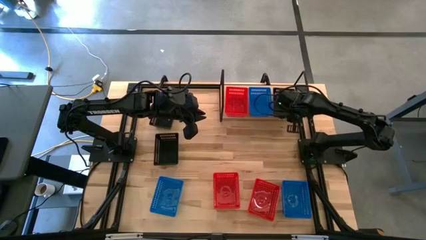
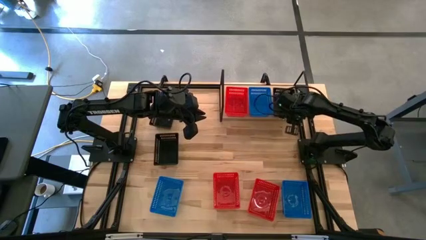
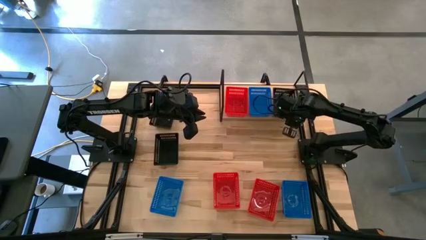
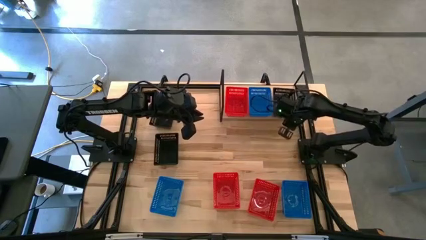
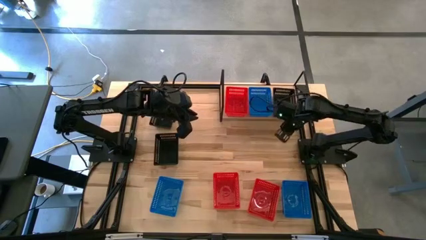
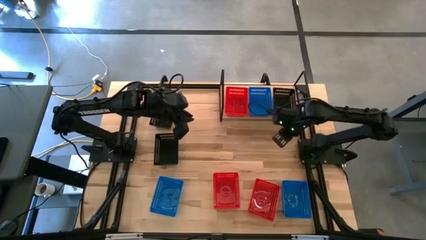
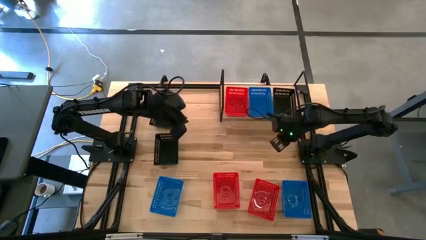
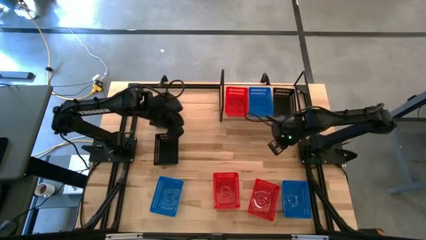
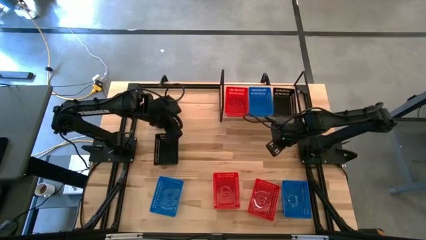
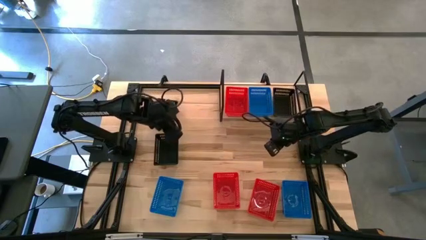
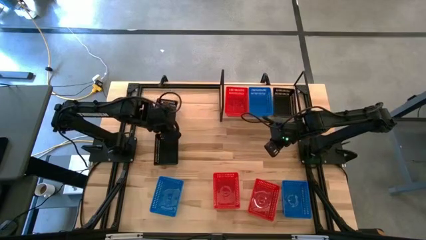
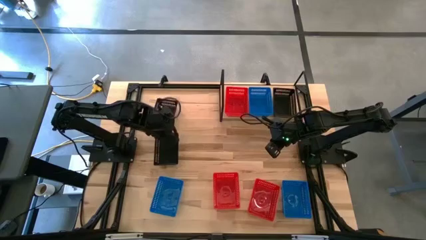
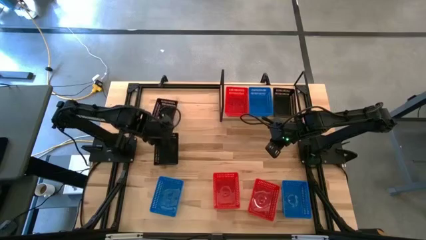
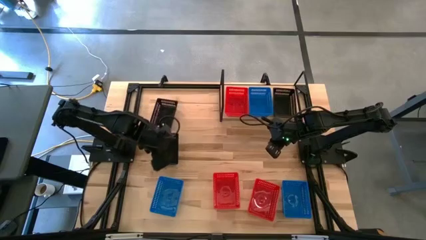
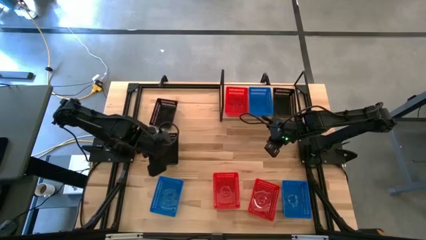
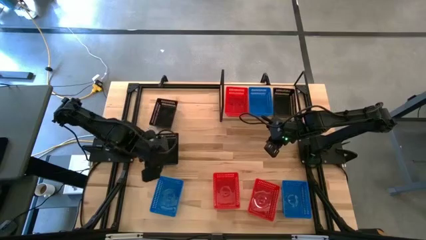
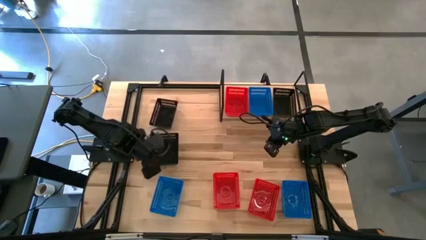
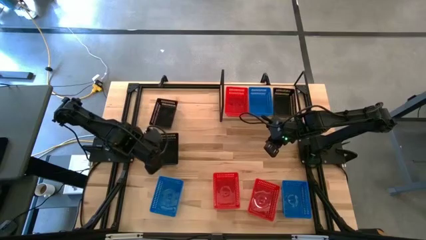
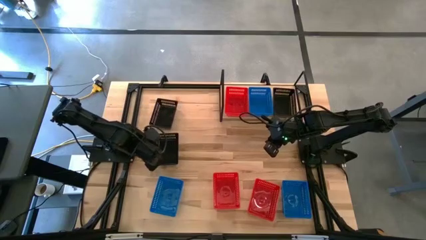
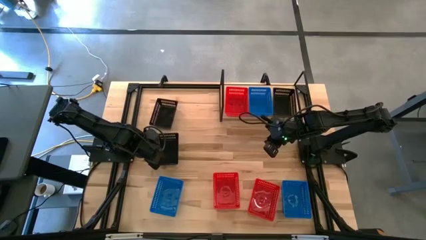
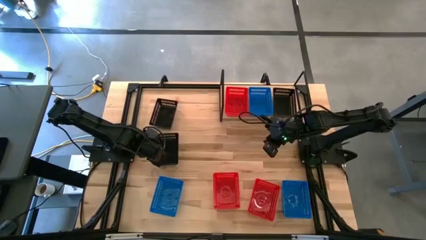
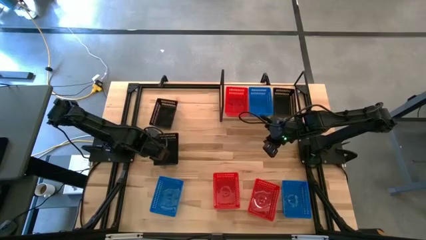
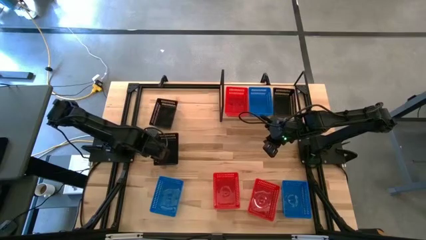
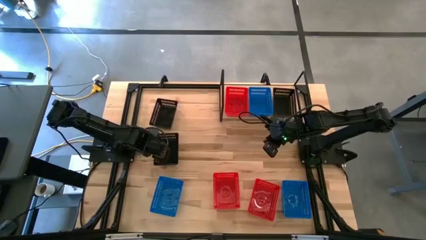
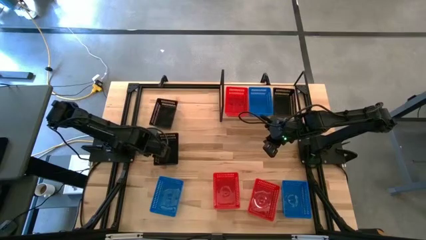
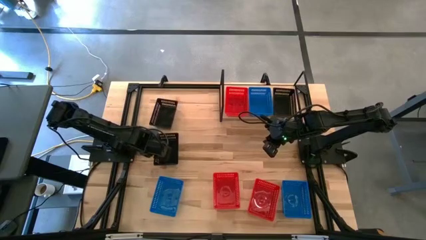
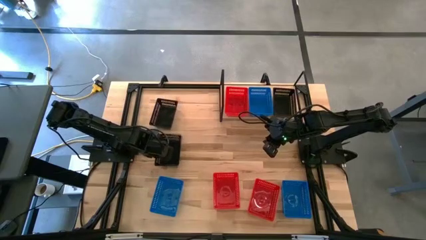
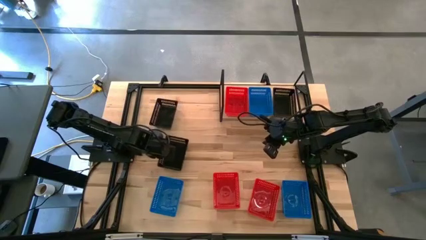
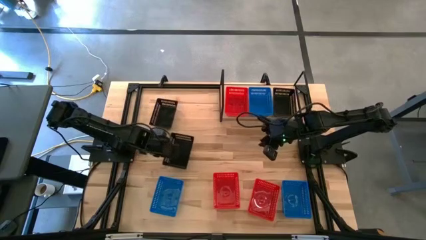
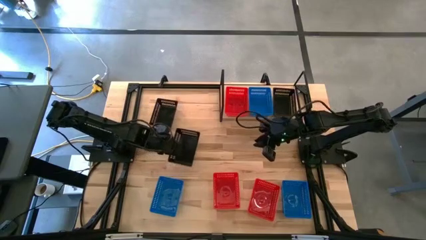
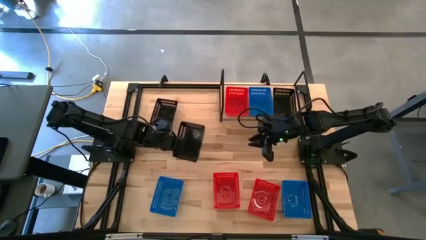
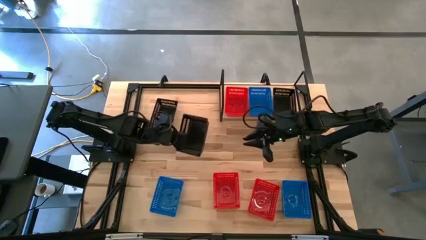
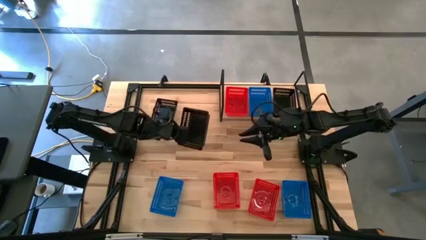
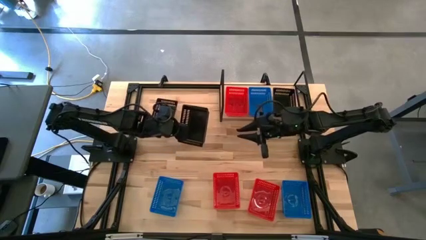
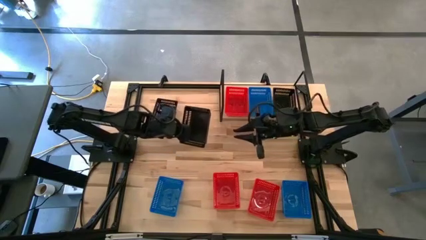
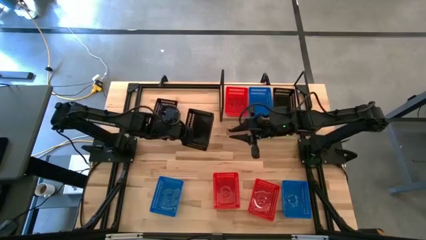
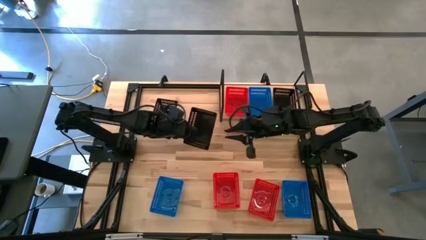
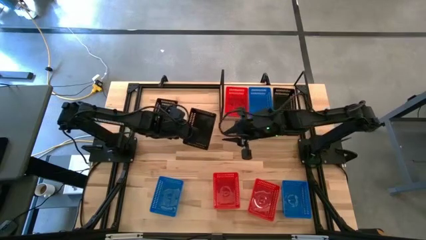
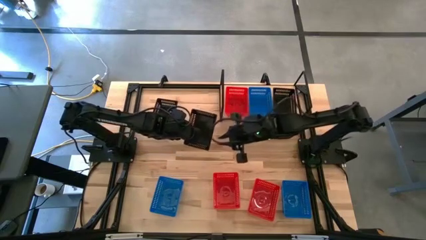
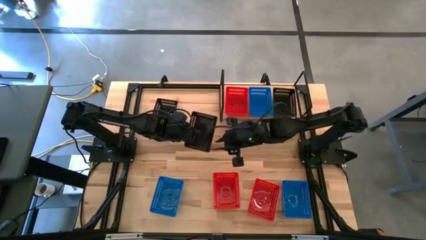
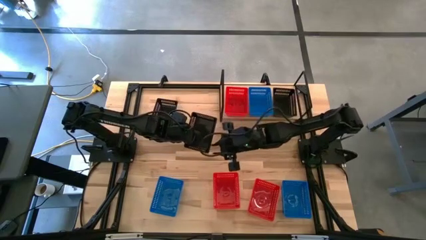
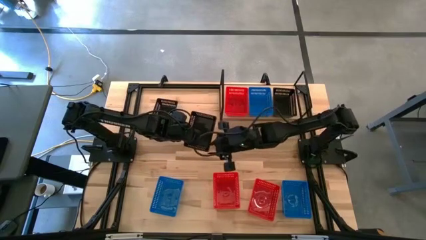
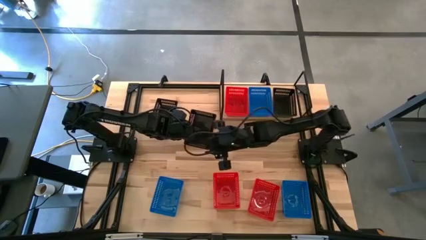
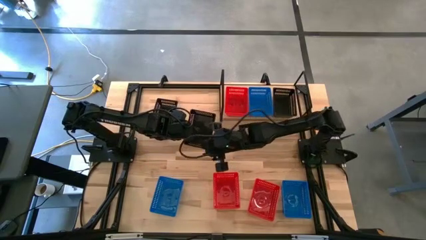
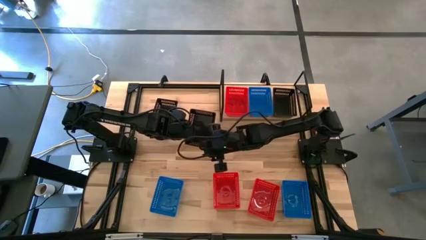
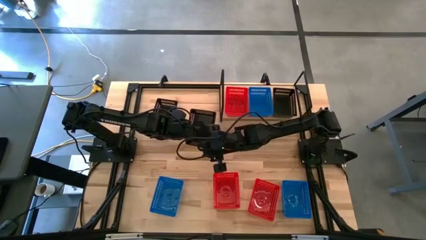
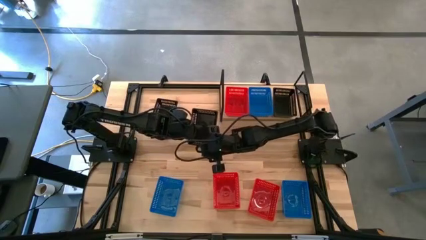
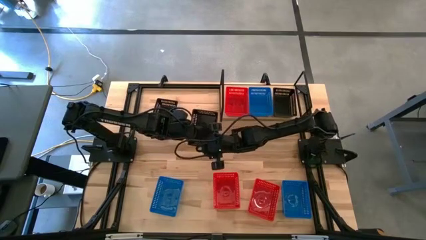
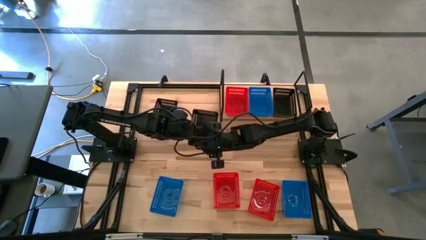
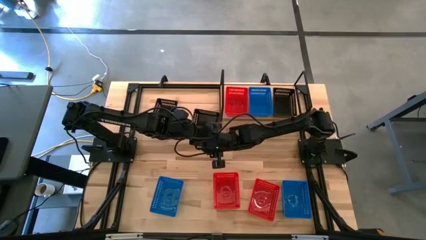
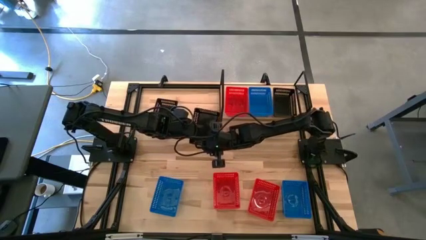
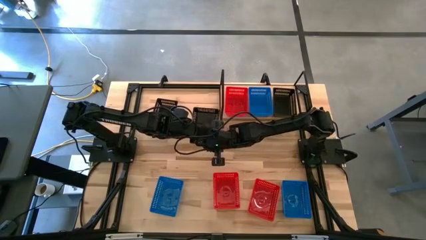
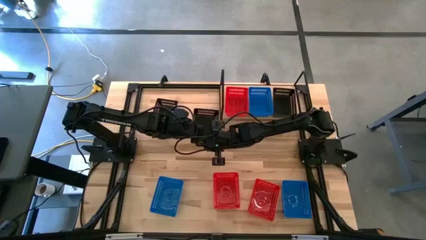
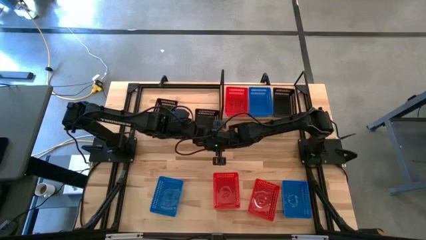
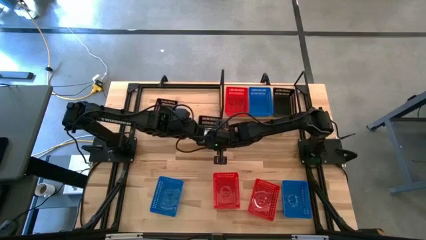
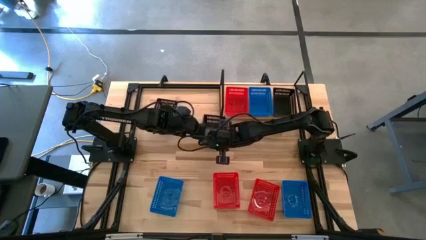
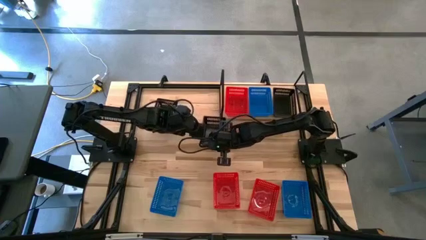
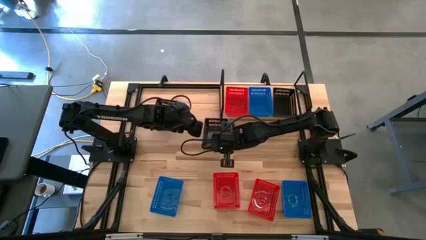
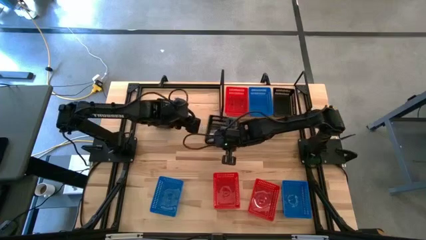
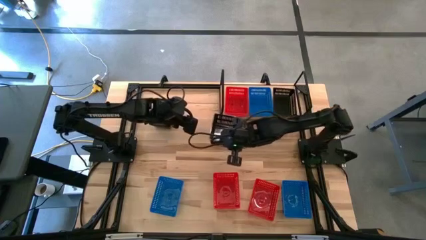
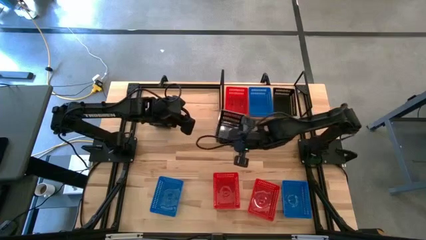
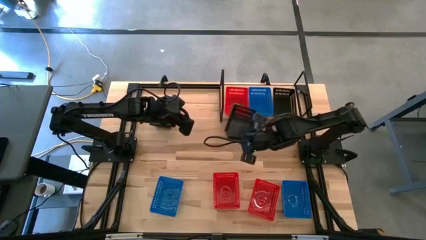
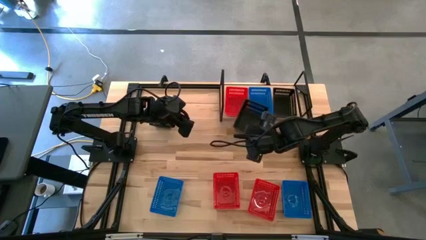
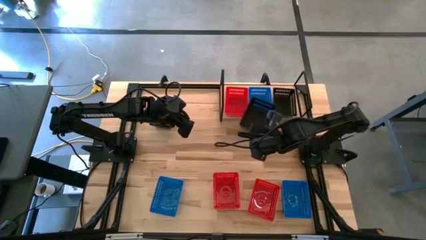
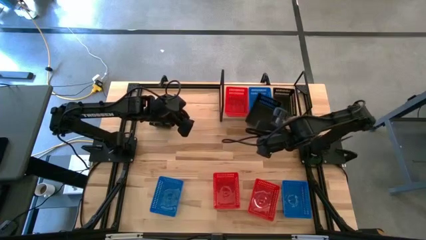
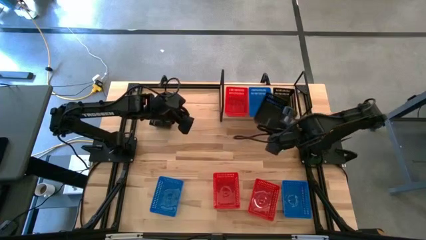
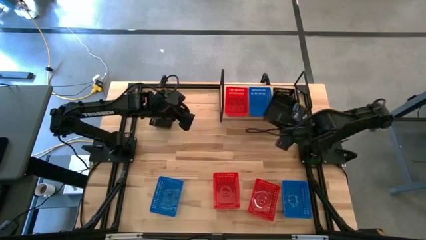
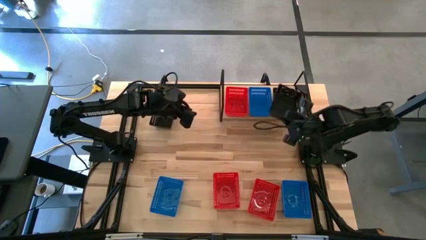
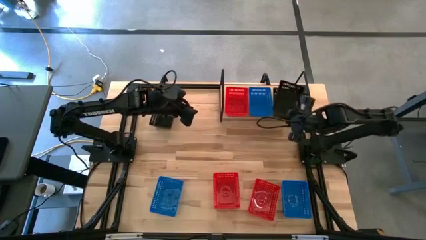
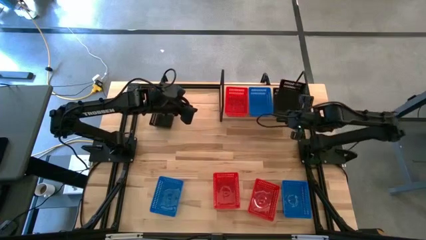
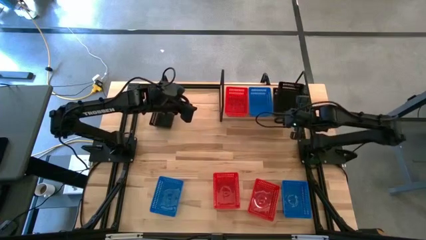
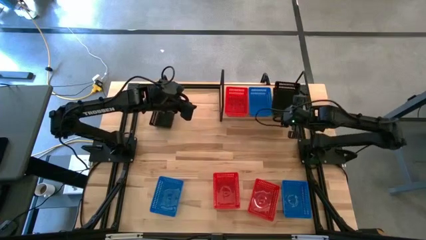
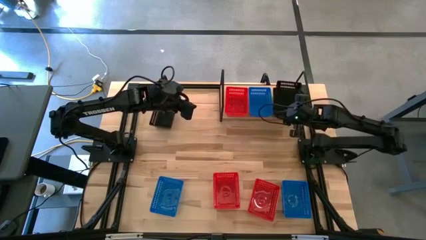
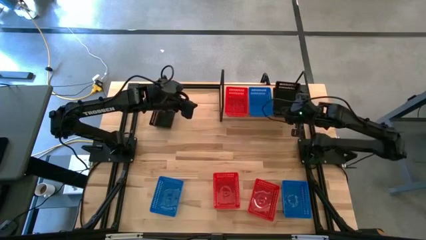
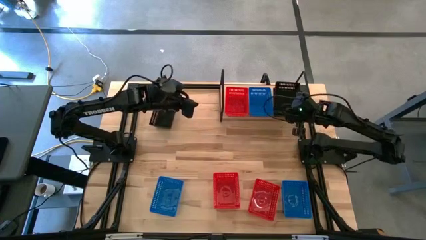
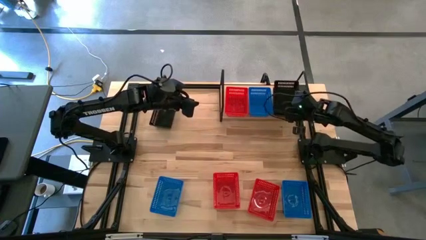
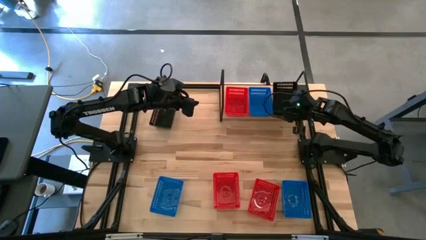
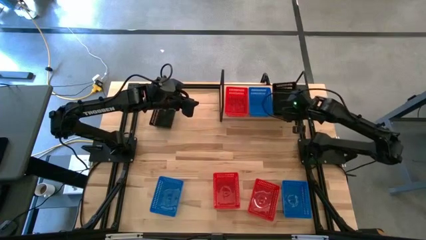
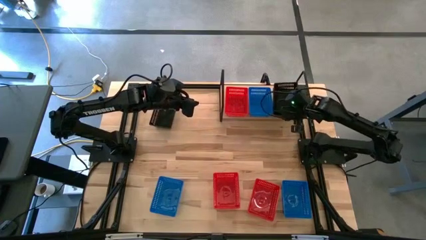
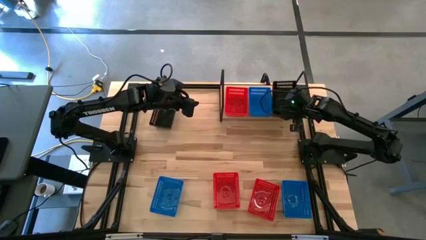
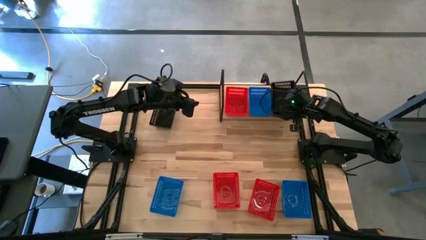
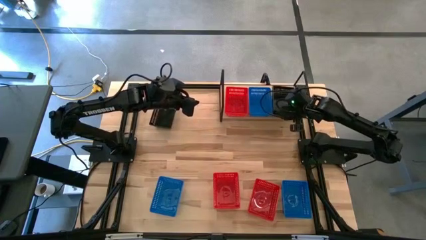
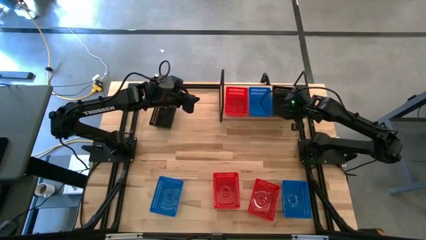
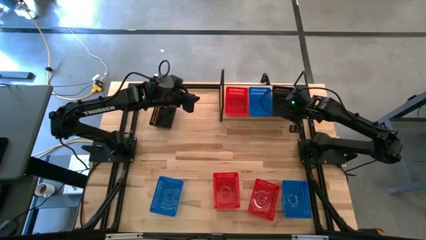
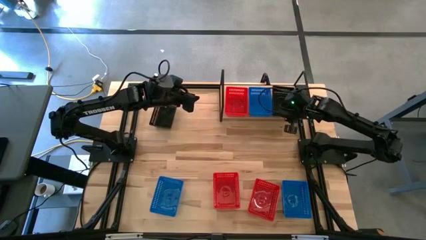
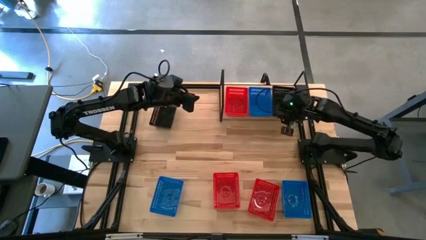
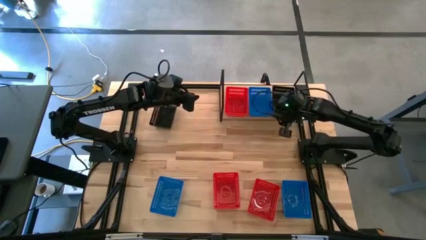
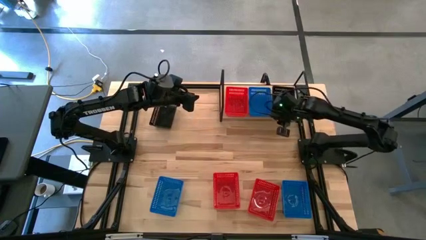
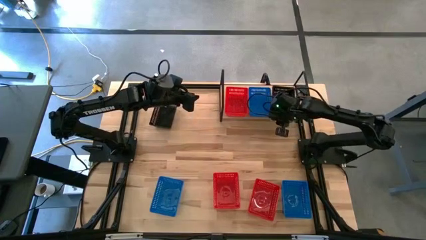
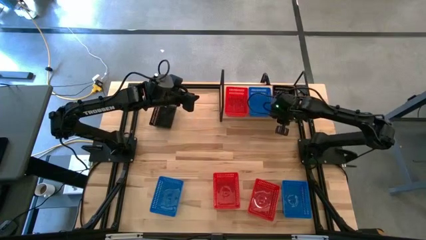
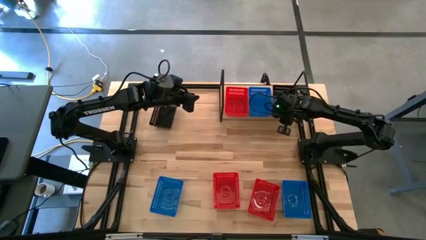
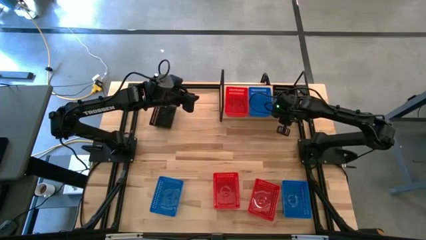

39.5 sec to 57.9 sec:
Task: Stack baskets on shelf by color
Stack the bottom black bin on top of the black bin on the shelf
